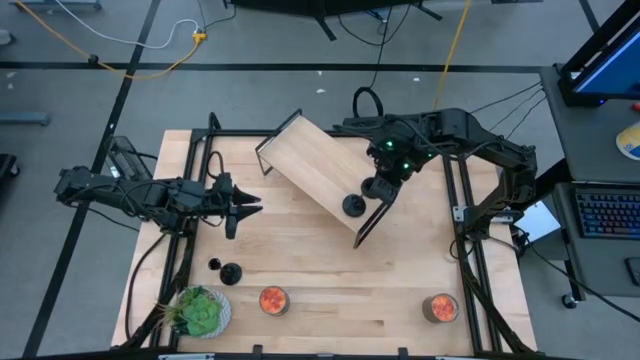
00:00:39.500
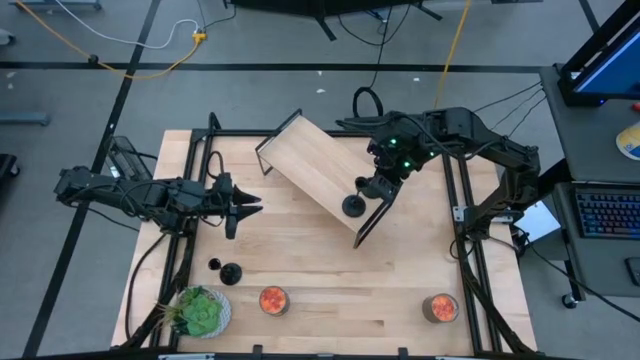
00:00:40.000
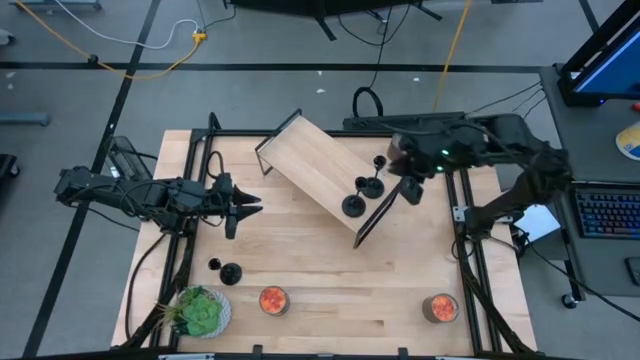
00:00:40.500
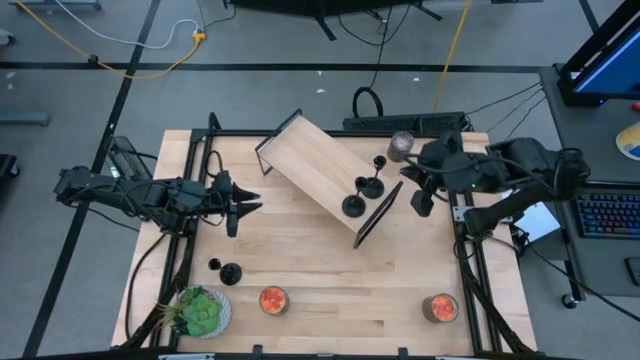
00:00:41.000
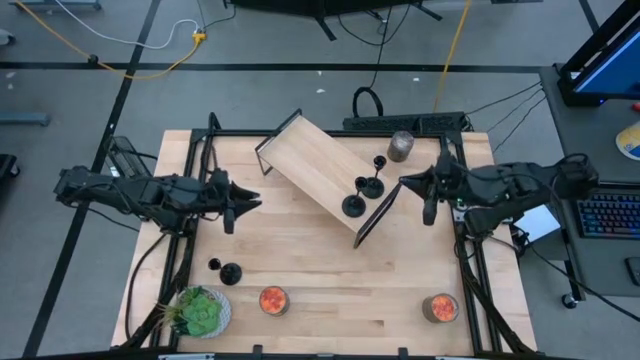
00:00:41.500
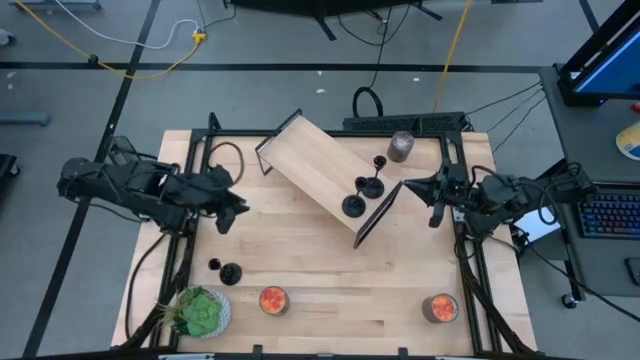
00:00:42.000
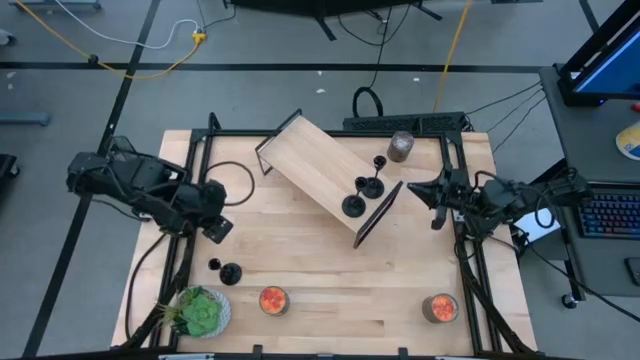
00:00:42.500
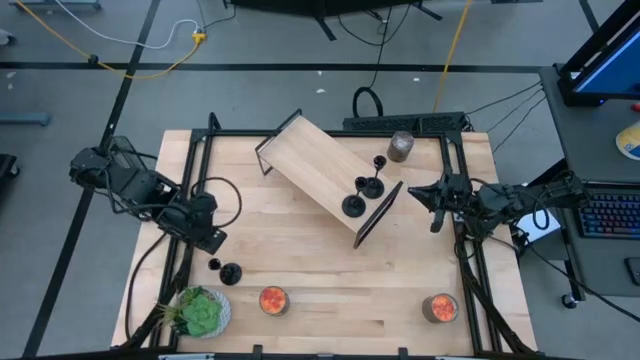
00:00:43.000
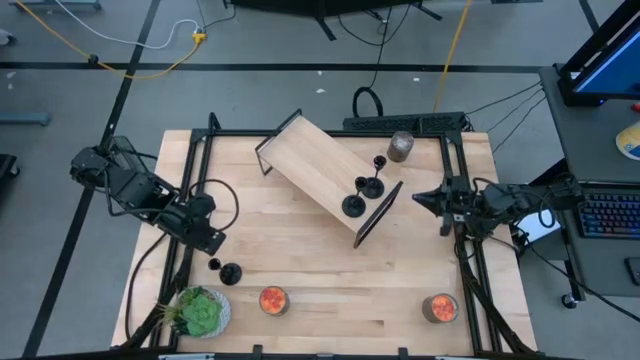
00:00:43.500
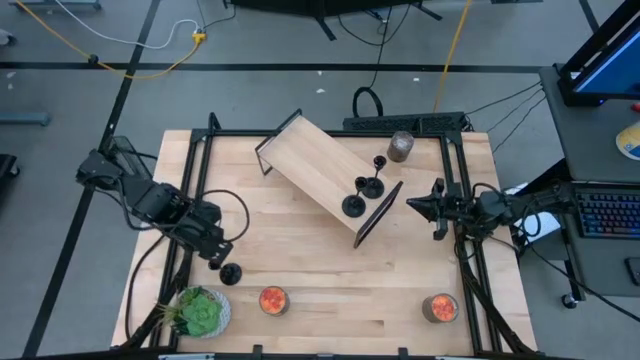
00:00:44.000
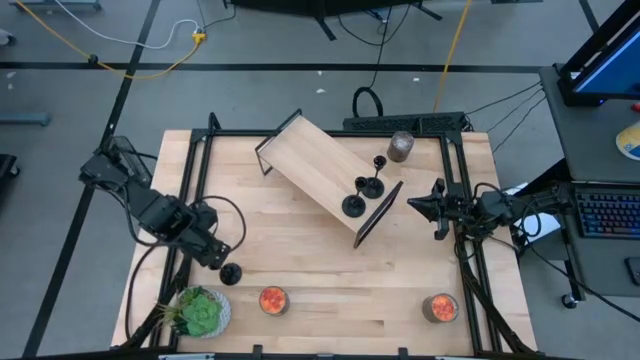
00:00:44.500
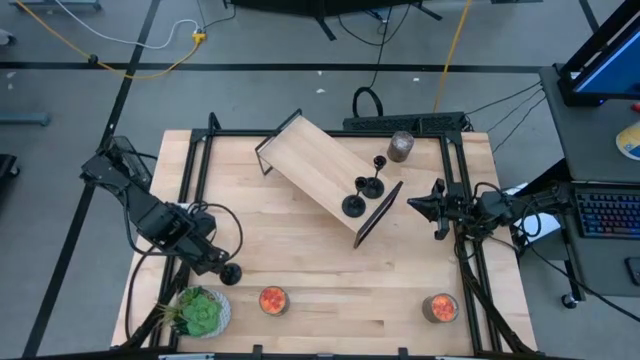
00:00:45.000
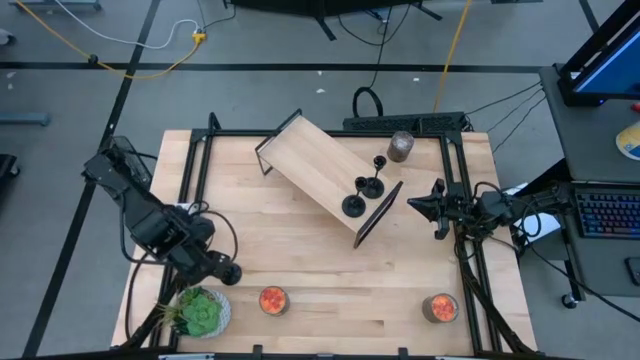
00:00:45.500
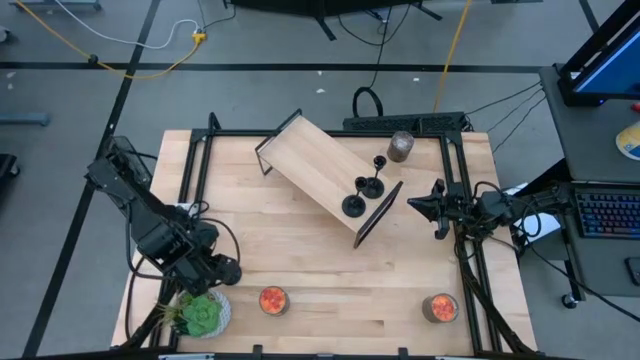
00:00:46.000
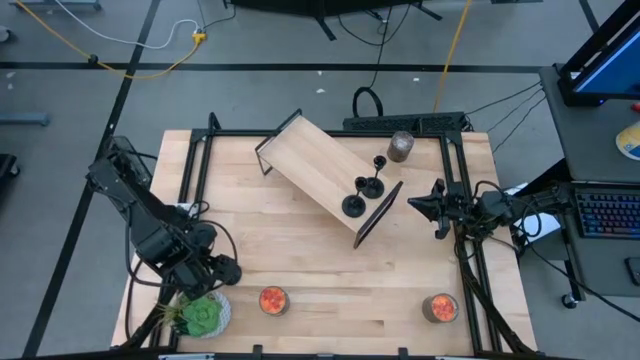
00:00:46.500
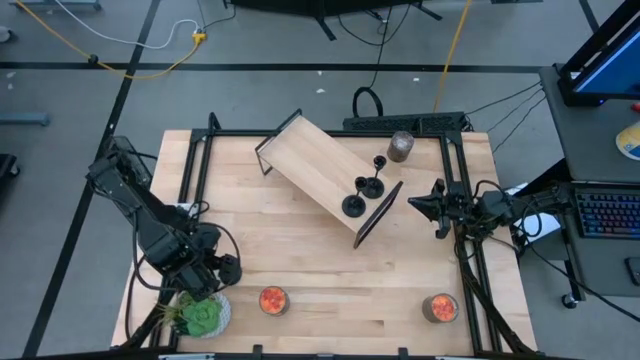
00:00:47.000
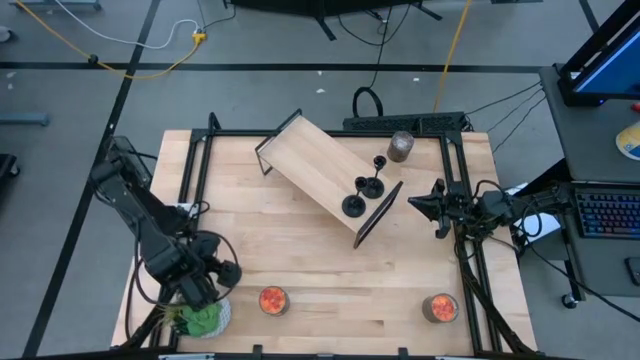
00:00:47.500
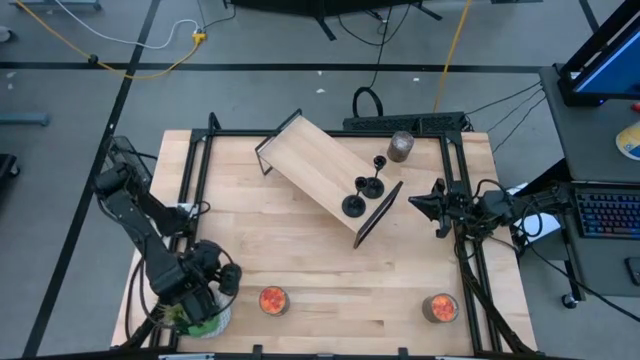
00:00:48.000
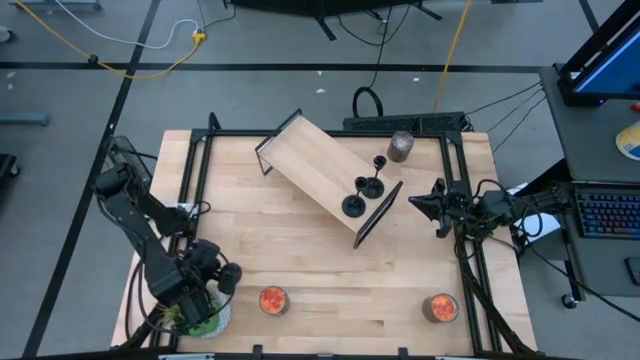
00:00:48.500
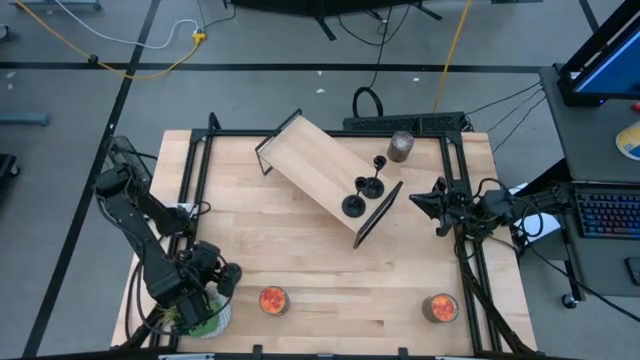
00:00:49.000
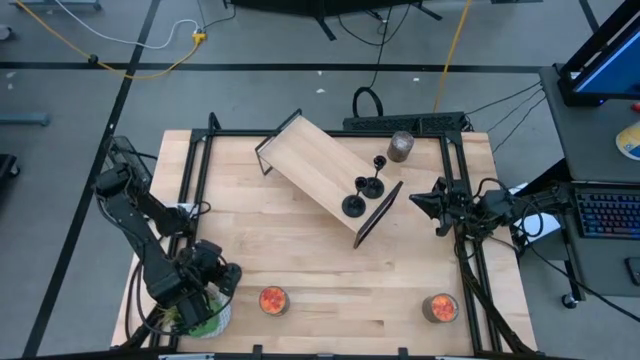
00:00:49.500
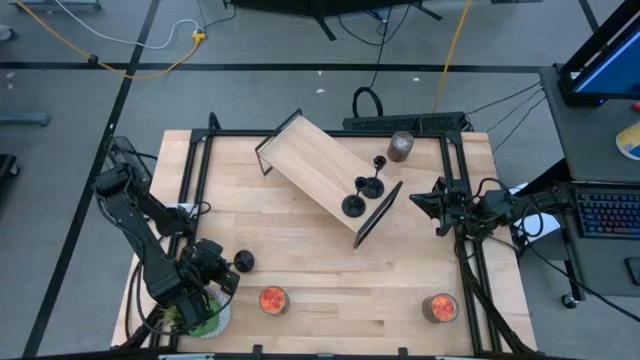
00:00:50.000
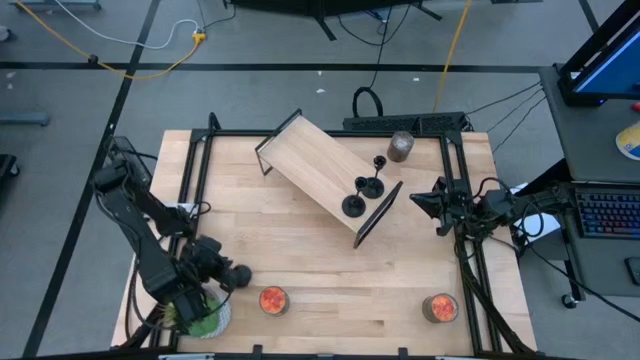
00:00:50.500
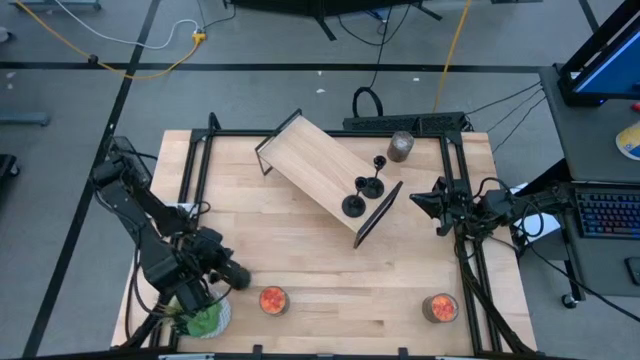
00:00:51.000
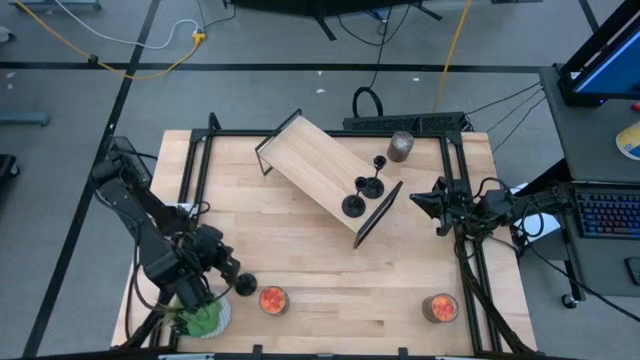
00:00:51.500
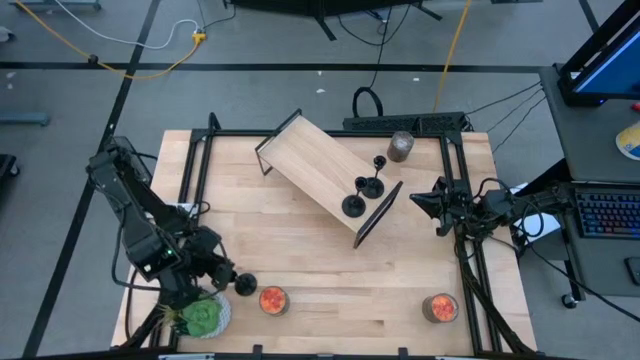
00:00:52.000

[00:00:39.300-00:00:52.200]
Task: Pick & Place candle stick holders
Put the black candle holder on the shelf

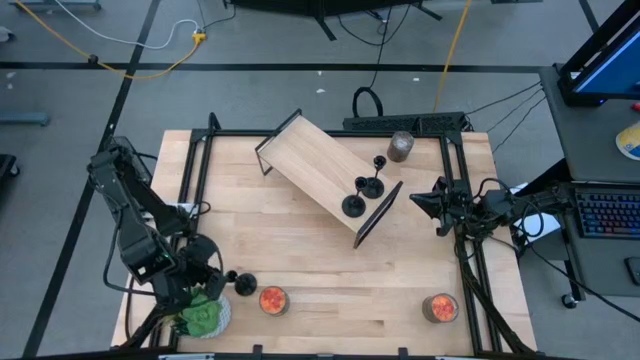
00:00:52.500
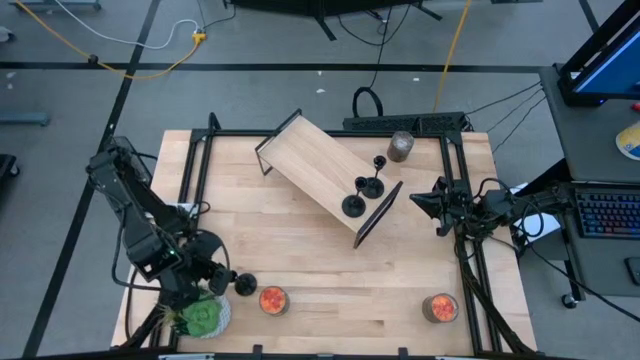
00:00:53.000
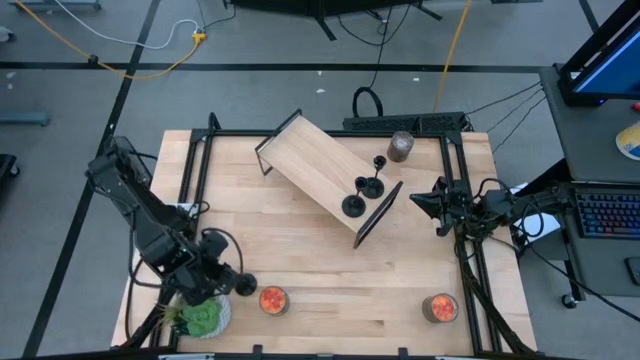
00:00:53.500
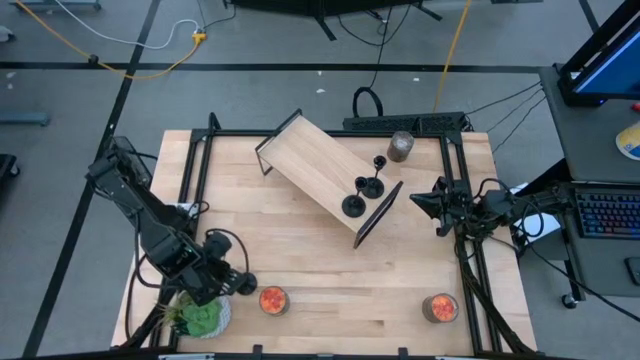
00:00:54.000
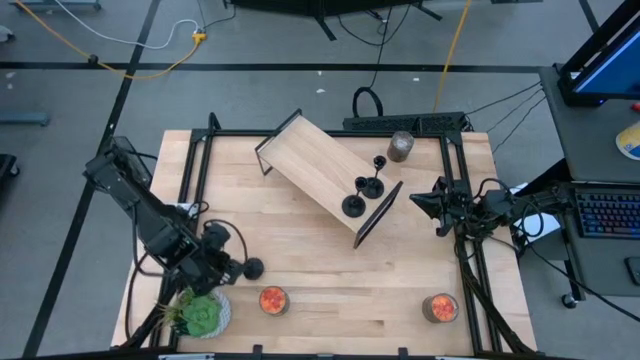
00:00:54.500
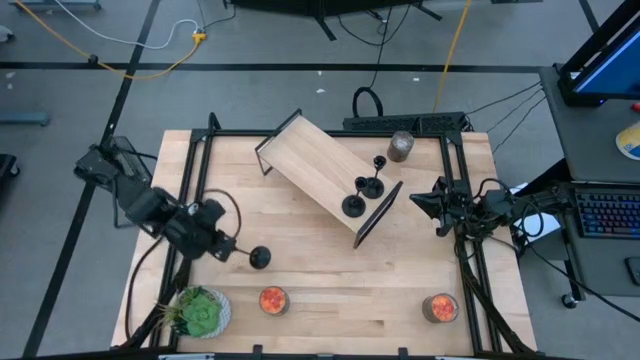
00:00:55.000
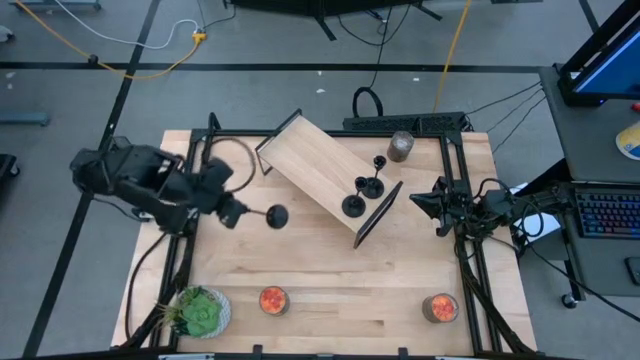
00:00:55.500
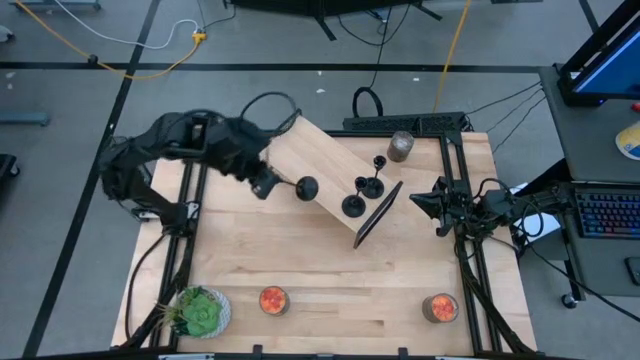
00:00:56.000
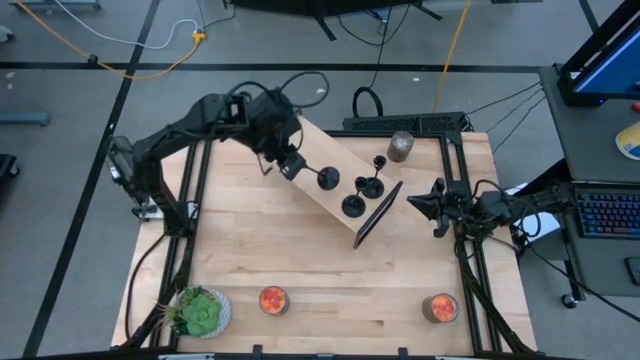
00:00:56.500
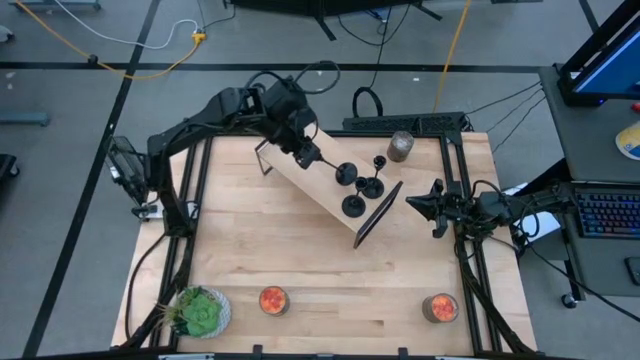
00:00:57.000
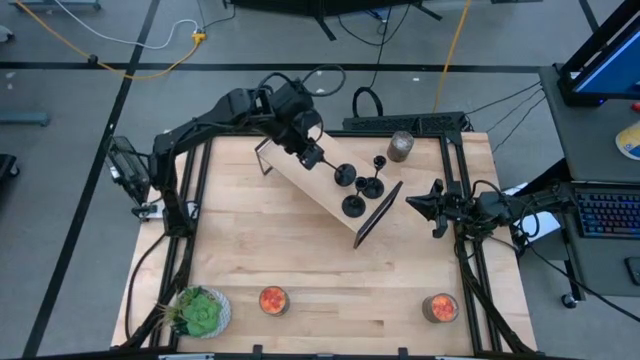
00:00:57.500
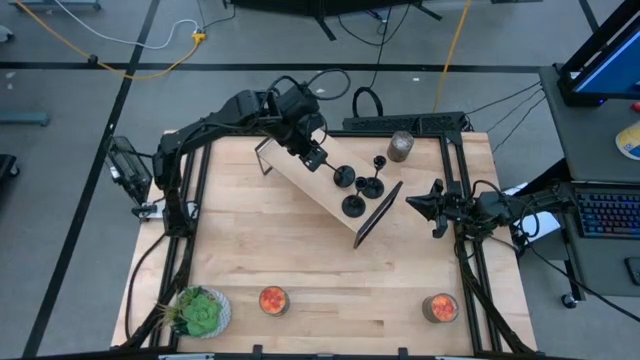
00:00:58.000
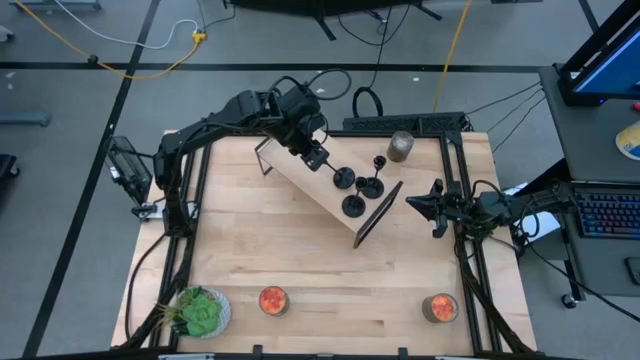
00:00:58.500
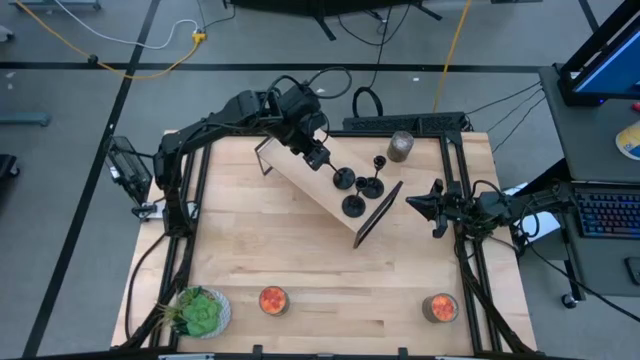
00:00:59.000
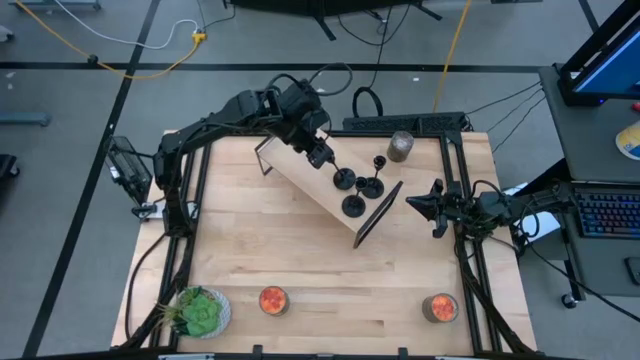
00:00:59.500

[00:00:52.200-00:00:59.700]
Put the right black metal candle holder on the shelf

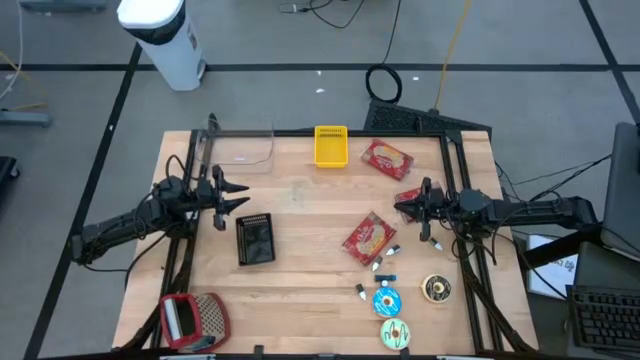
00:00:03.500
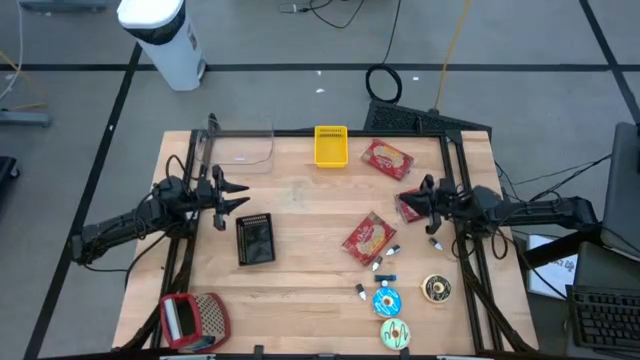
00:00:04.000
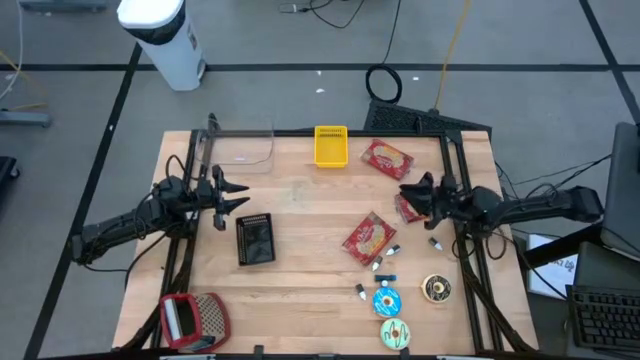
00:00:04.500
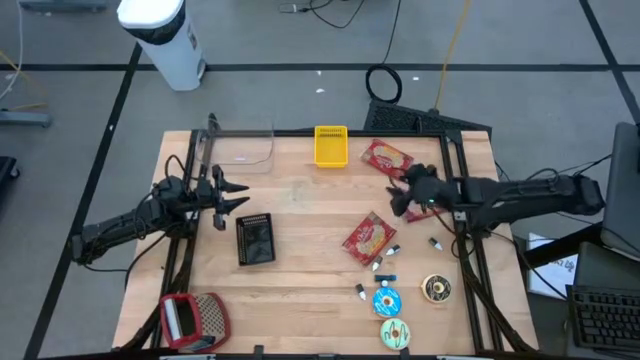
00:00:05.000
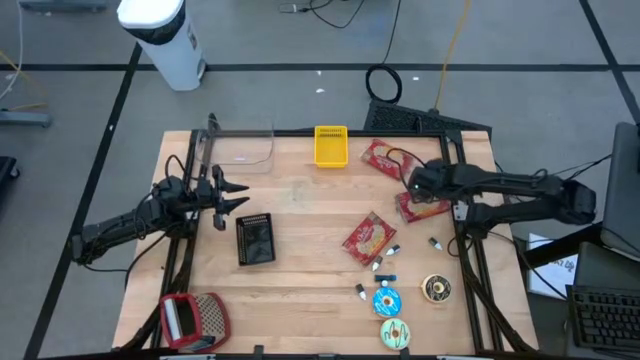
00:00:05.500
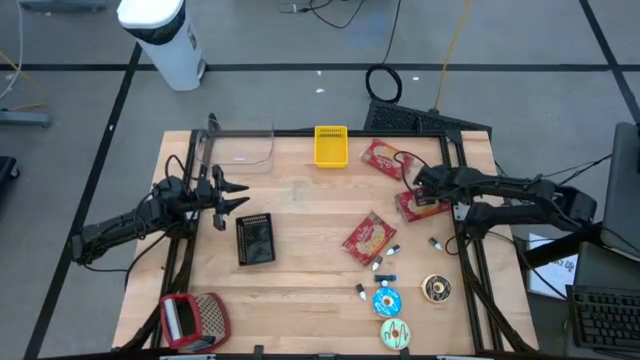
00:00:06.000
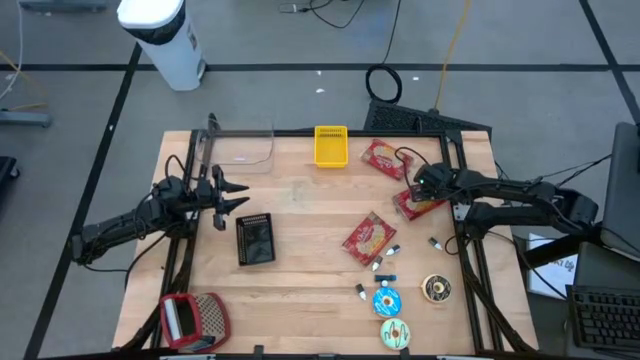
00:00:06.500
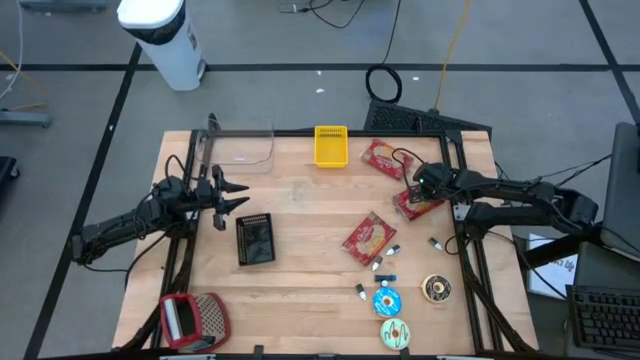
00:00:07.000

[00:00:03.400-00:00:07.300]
Task: Pick & Place Food Item
Put the middle popcorn pack into the transparent bin
